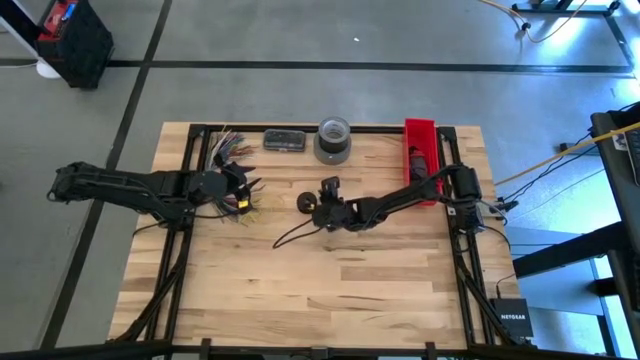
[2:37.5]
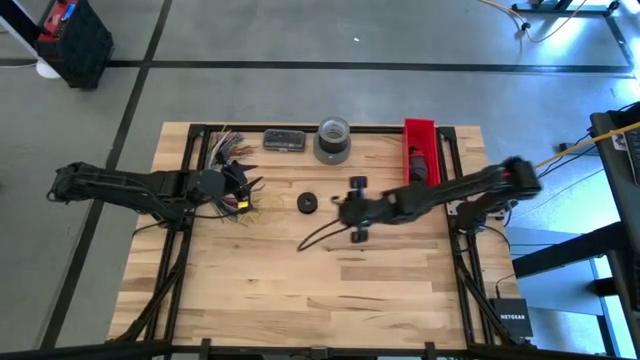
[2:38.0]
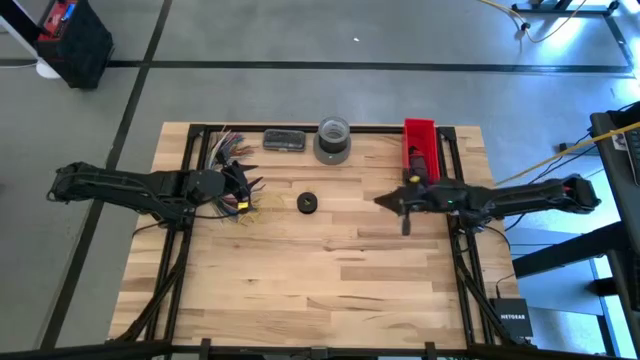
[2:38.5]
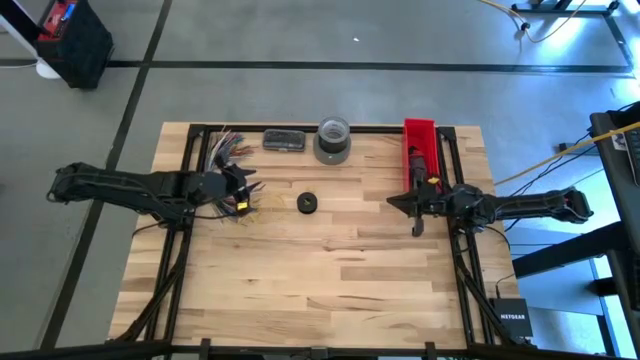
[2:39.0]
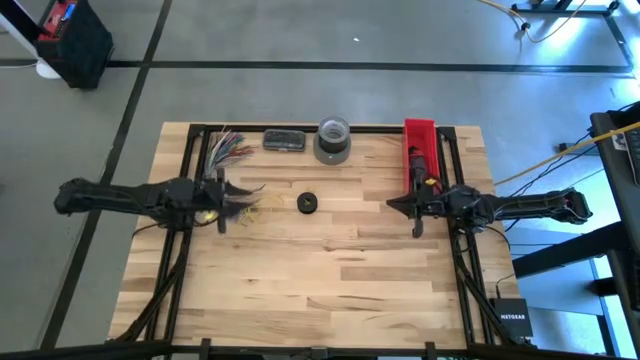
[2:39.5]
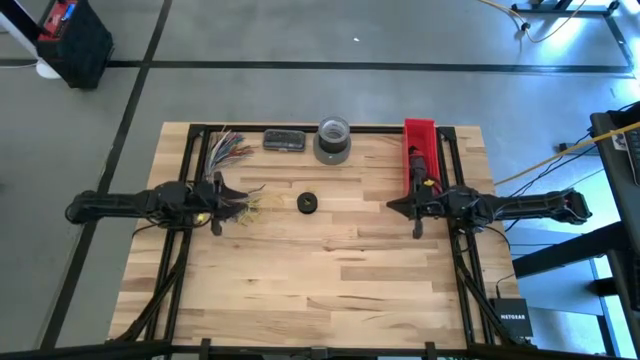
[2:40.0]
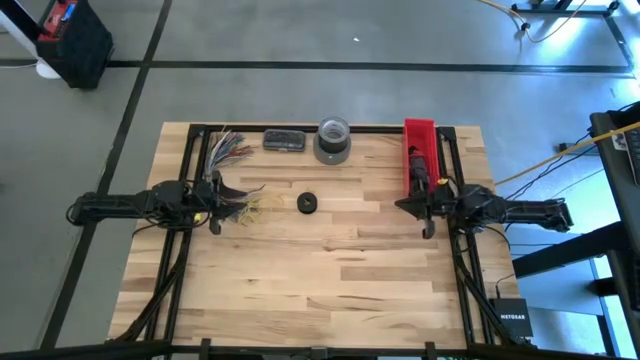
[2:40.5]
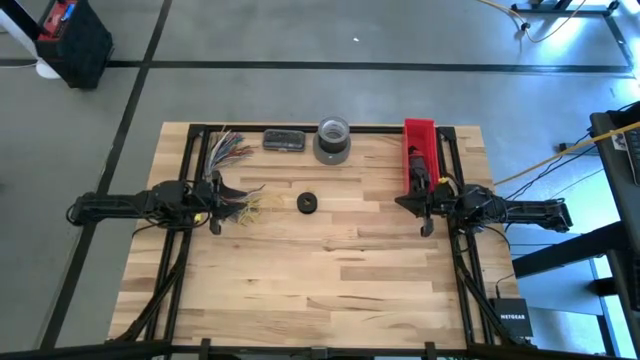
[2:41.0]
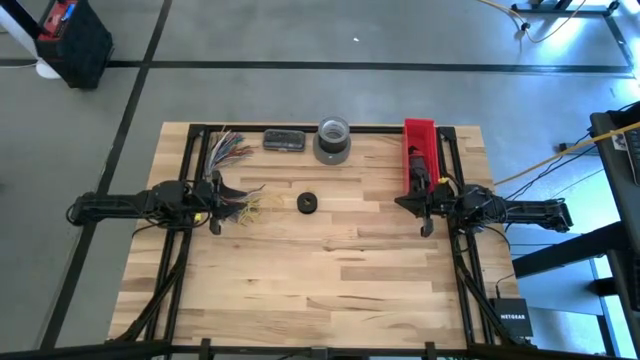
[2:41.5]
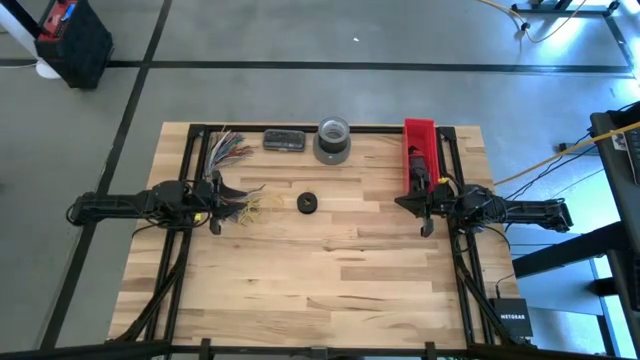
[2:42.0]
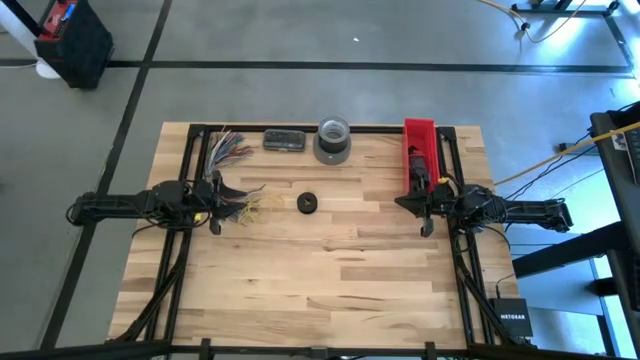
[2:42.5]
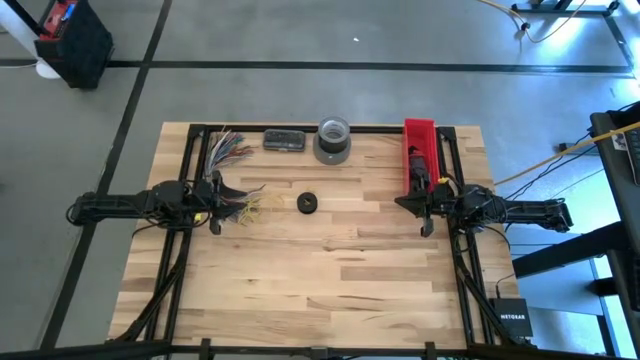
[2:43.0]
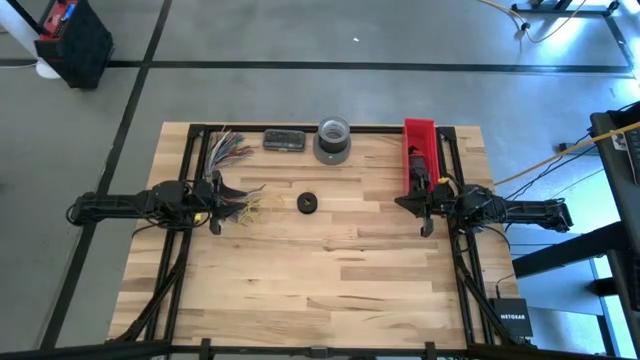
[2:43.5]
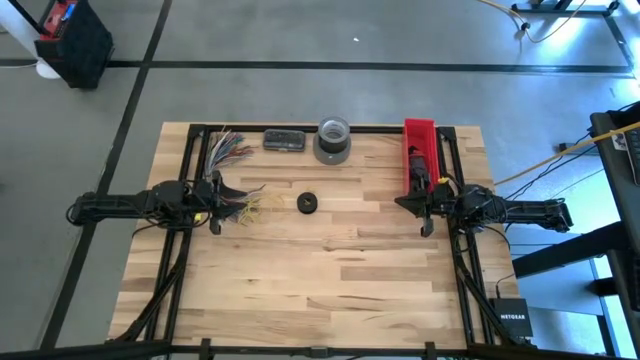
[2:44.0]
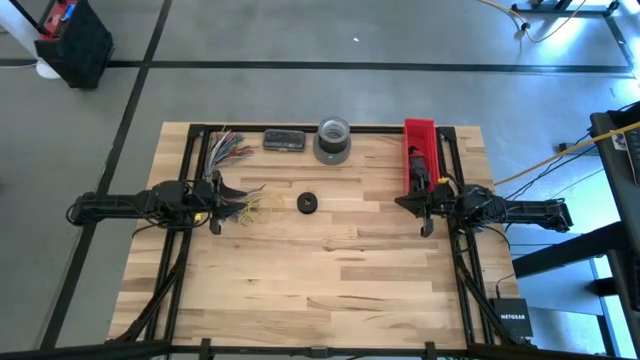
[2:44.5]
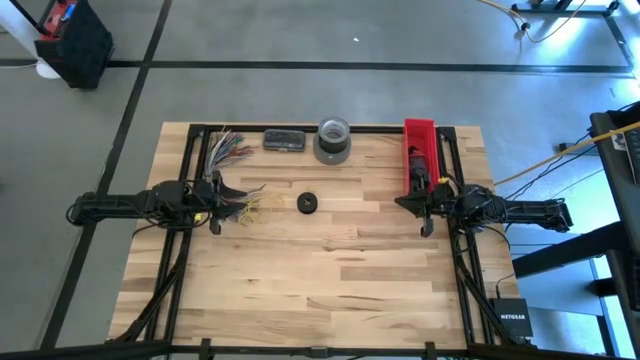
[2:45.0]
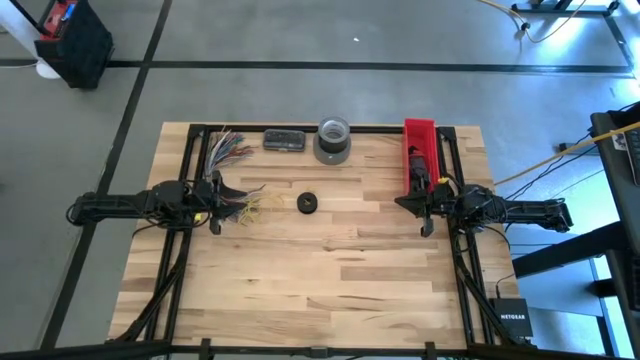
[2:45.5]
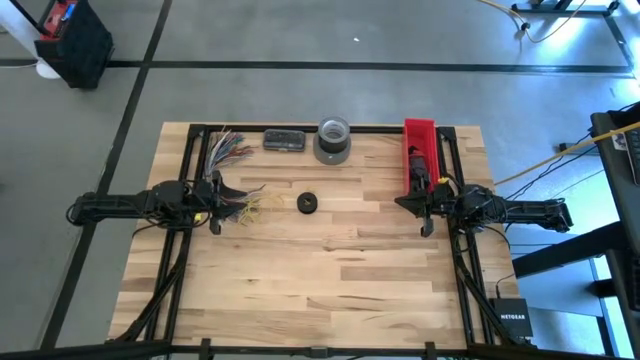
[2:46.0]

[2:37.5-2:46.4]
Task: Coil cords
Return to Home Position

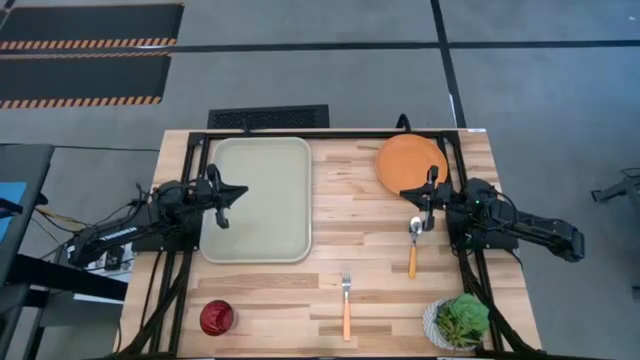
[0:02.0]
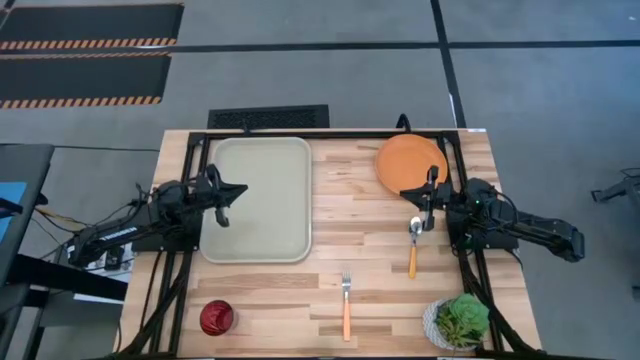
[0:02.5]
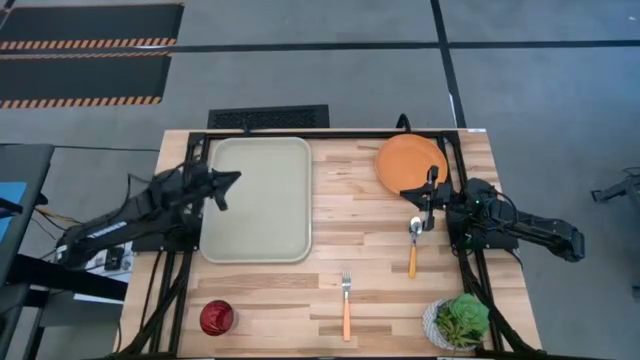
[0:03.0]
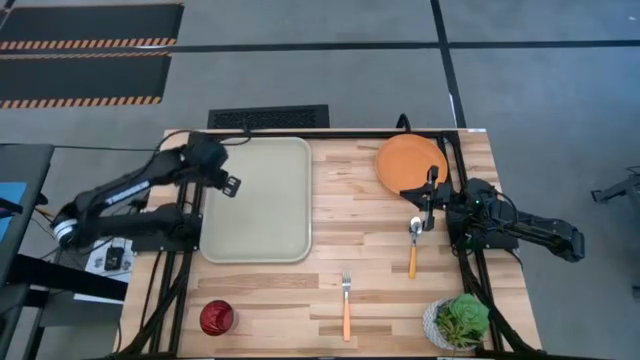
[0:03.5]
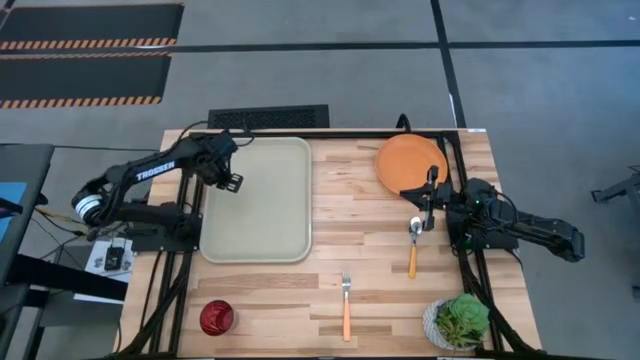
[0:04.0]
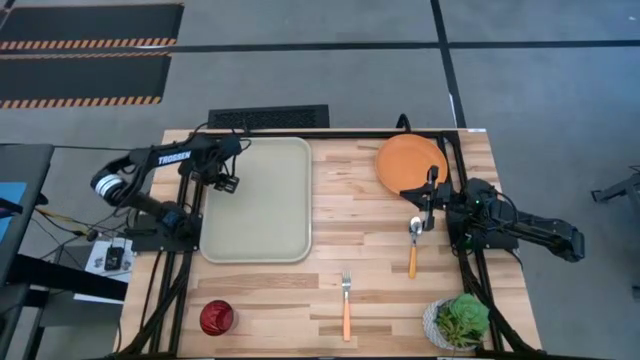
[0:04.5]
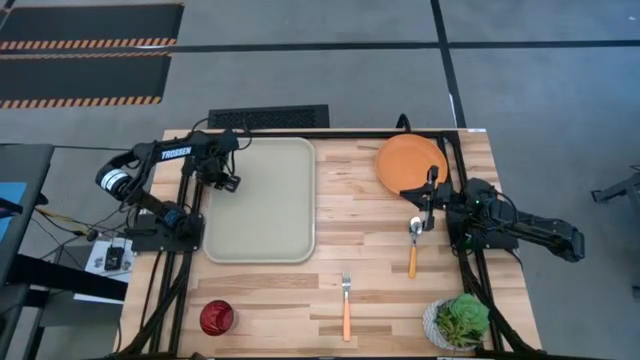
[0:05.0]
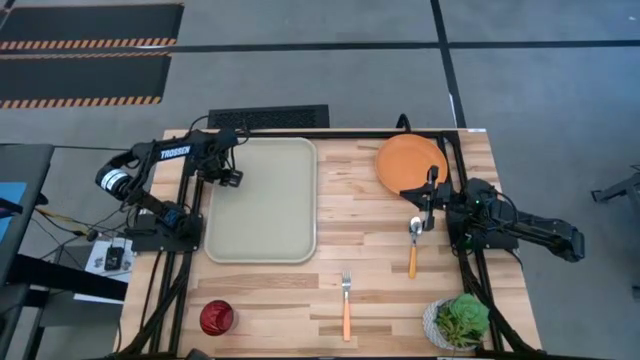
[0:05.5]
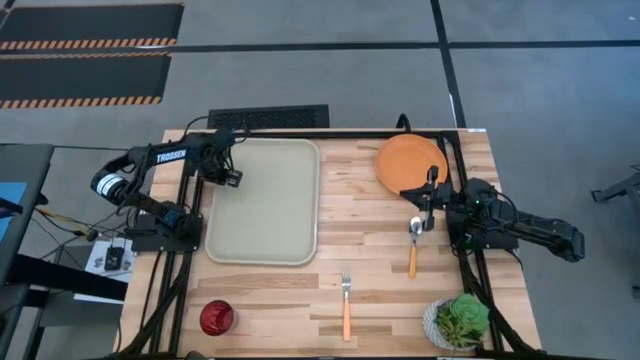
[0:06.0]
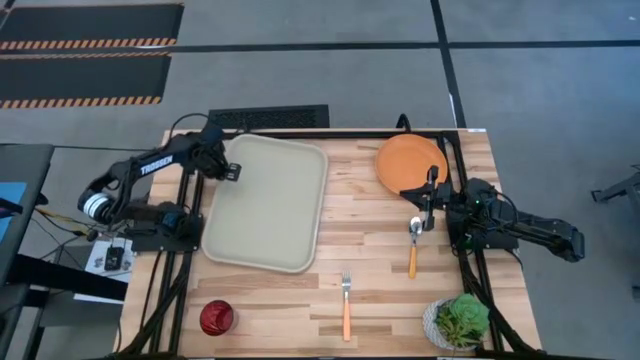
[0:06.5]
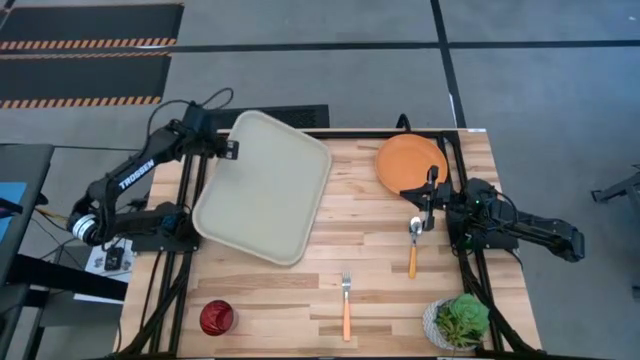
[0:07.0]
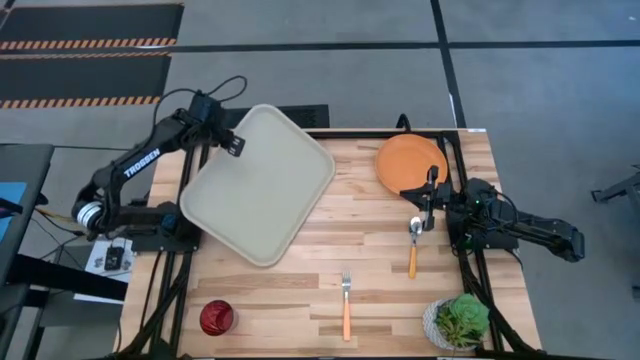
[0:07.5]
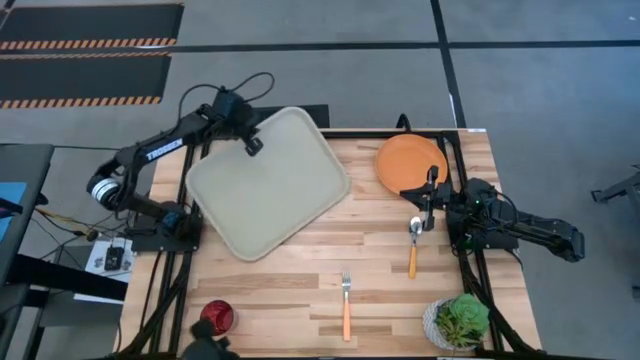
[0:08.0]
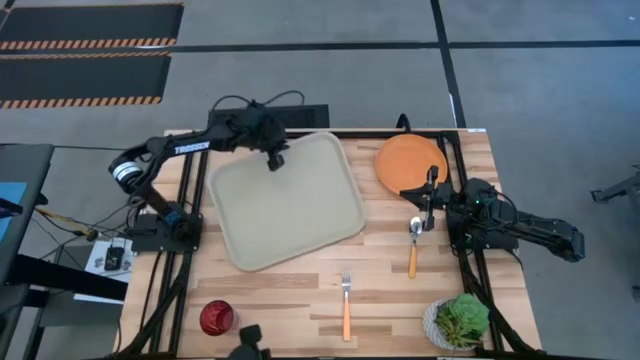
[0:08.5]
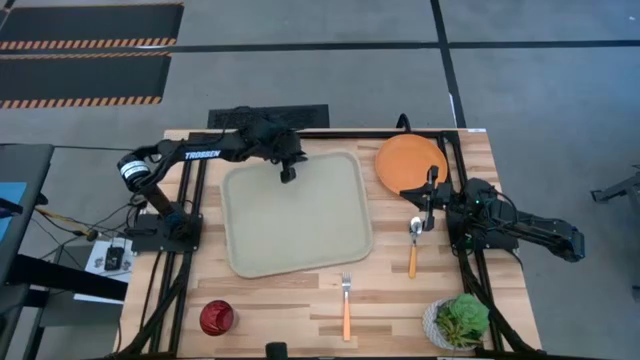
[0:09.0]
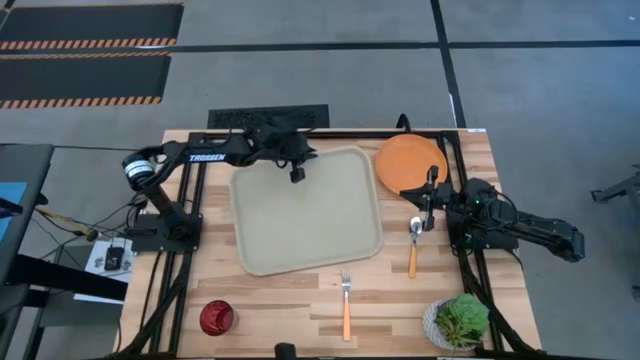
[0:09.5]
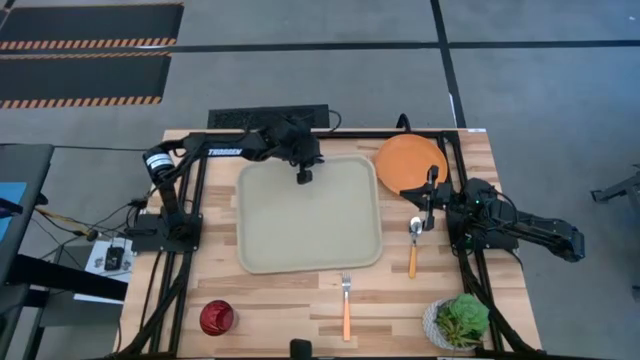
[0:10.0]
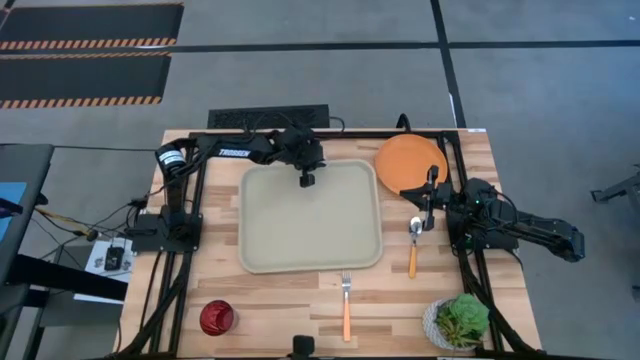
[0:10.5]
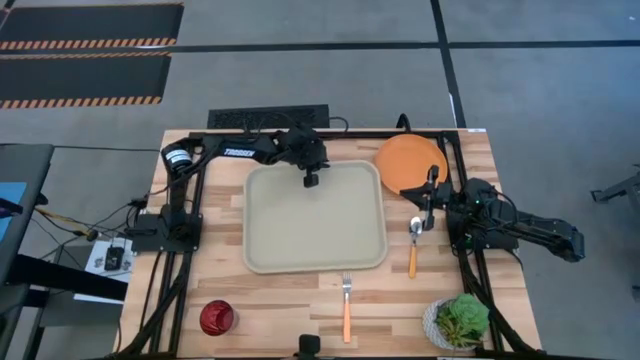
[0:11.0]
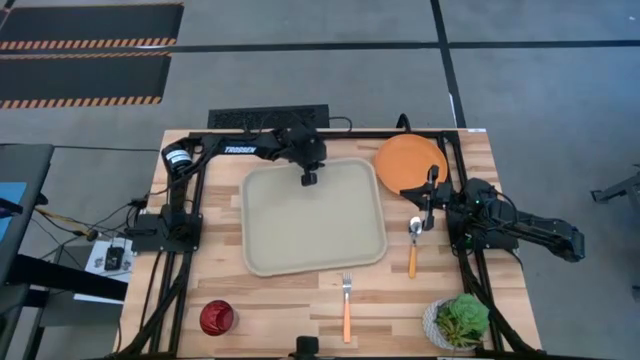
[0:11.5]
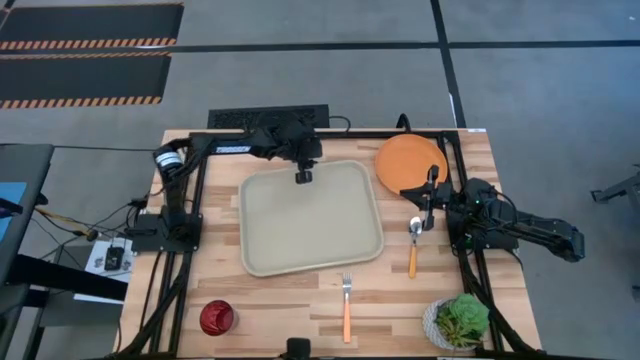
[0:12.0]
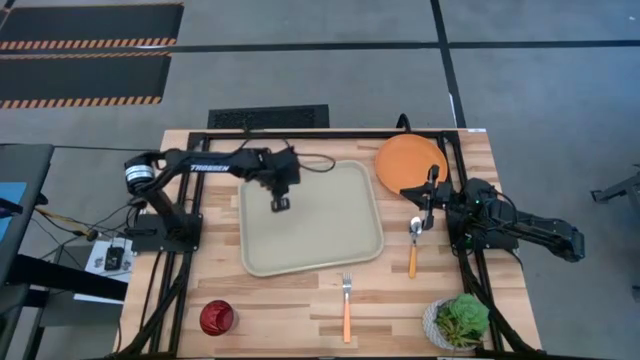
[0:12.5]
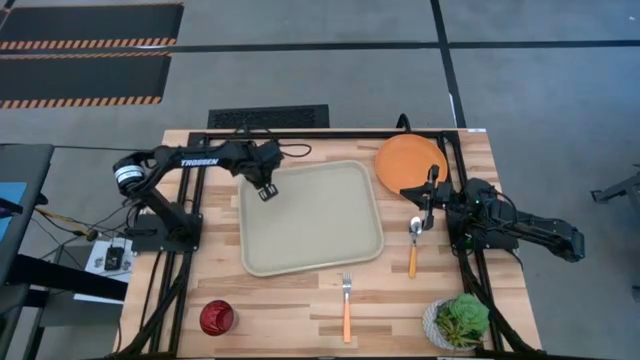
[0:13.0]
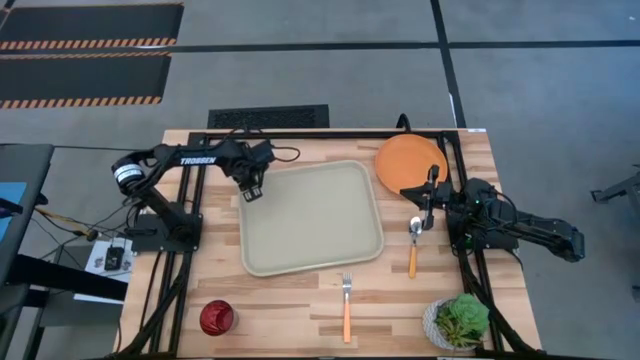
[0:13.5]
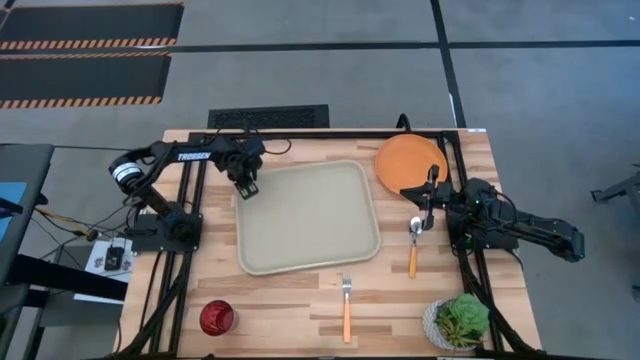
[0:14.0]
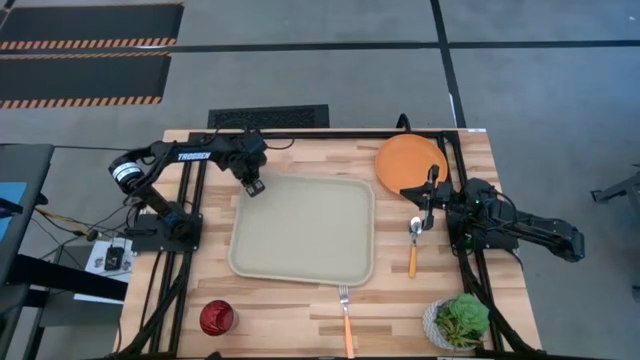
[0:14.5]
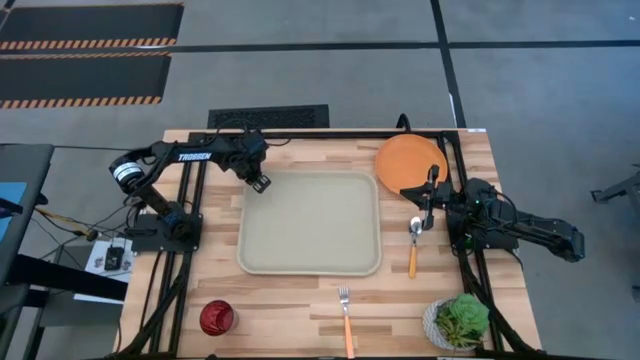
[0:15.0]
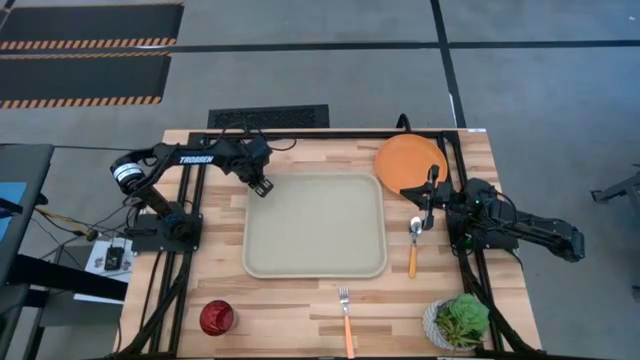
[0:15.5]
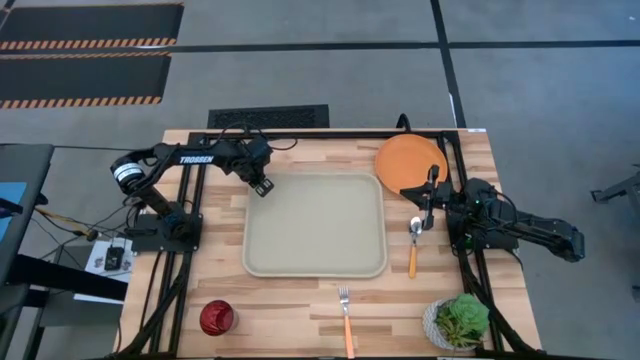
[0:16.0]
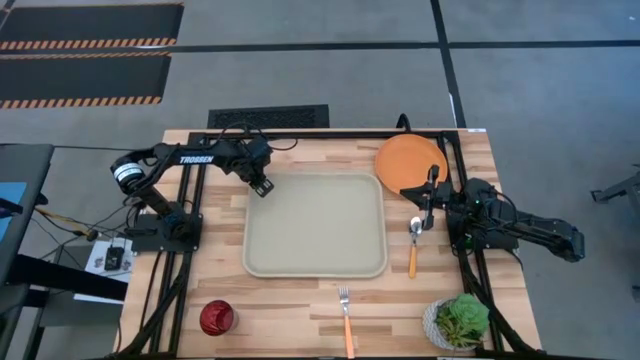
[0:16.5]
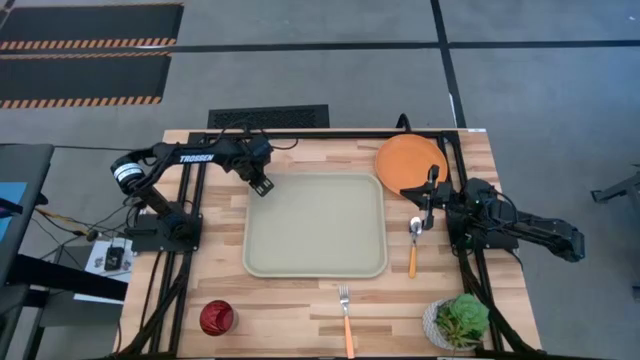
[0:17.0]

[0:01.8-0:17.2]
Task: Pick and place plate/cup/fork/spoon on tray
Prepare the gray serving tray
